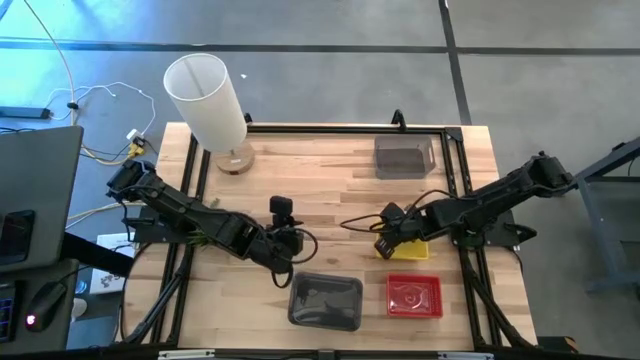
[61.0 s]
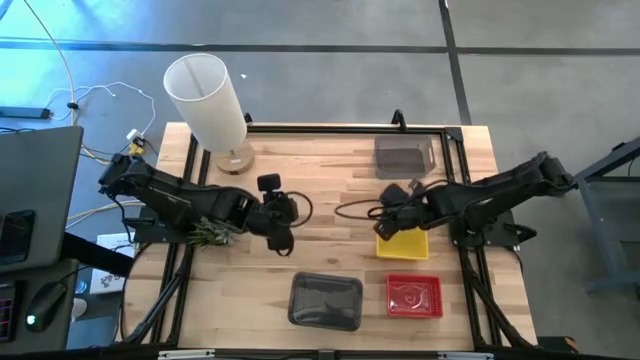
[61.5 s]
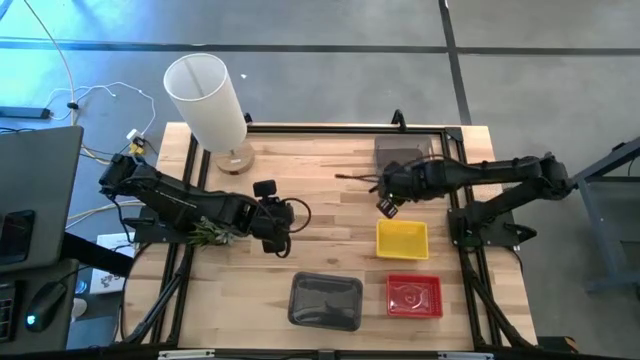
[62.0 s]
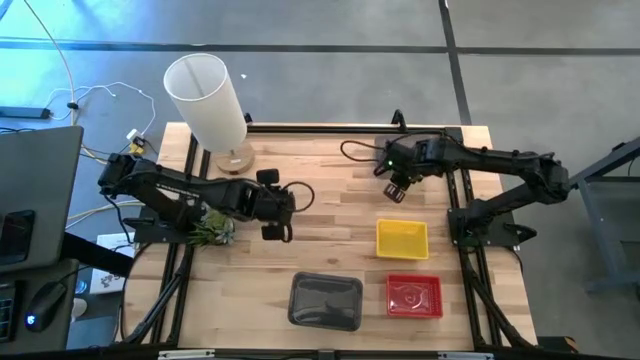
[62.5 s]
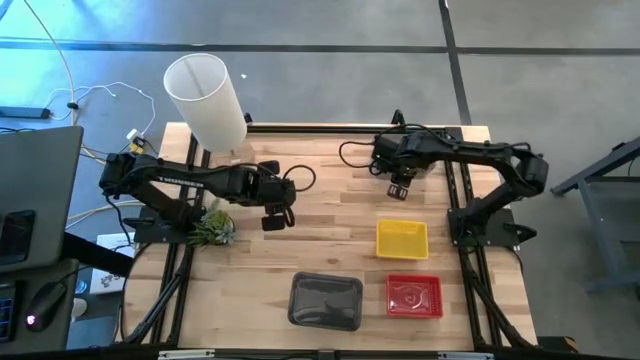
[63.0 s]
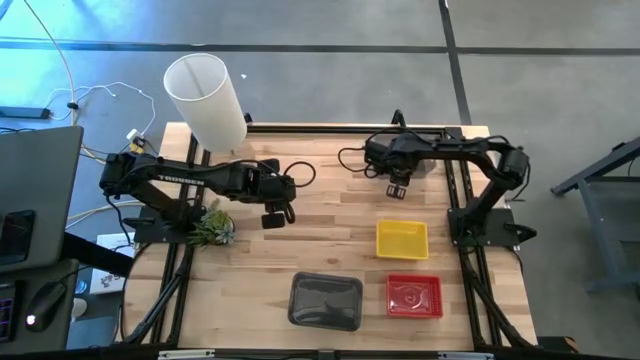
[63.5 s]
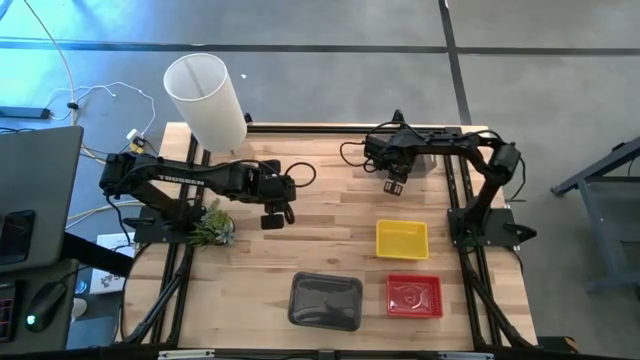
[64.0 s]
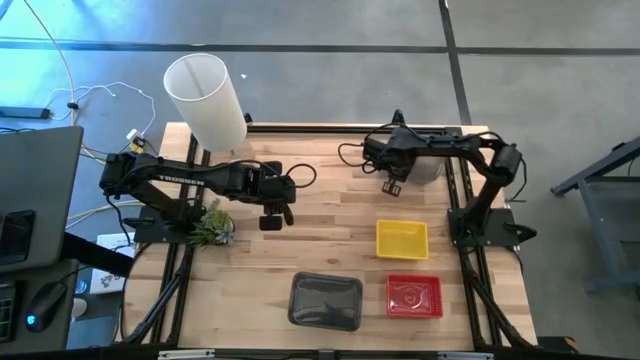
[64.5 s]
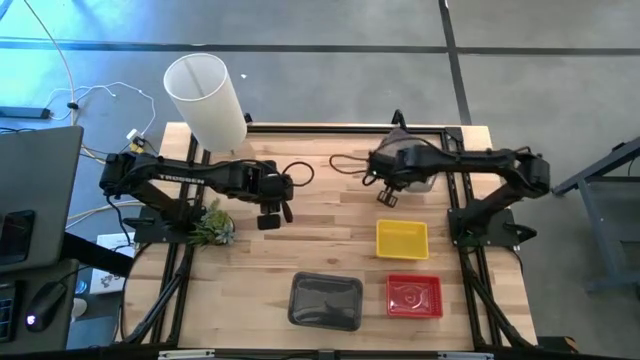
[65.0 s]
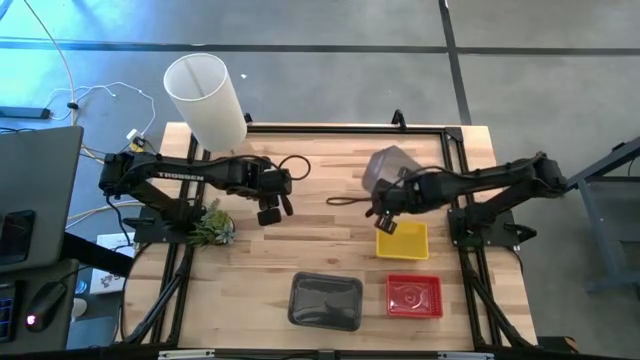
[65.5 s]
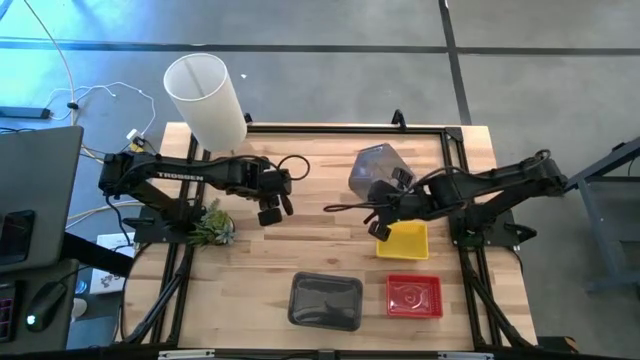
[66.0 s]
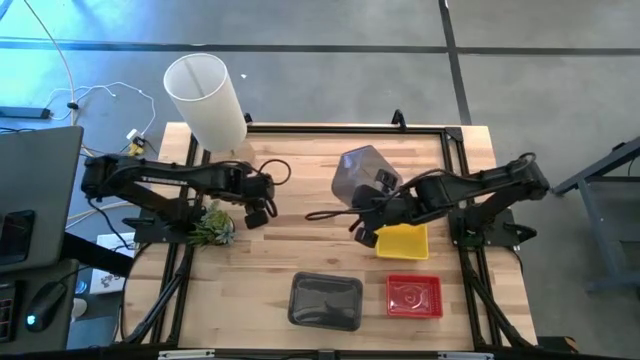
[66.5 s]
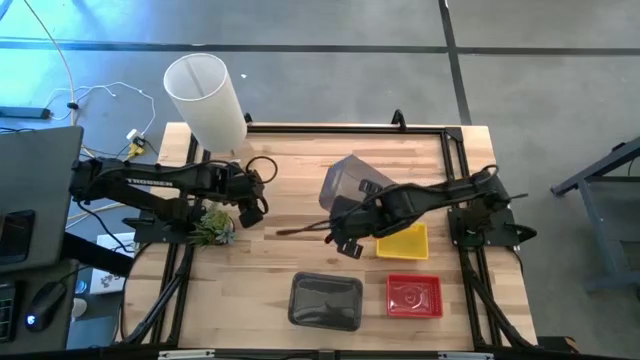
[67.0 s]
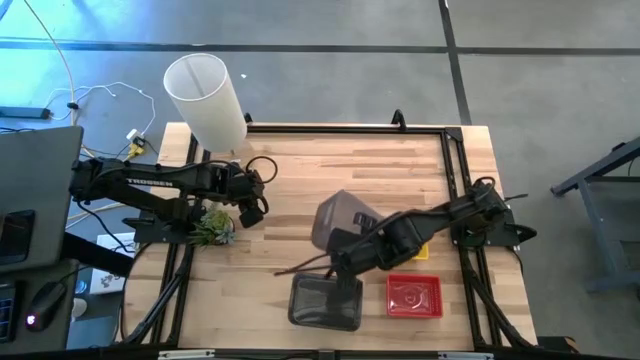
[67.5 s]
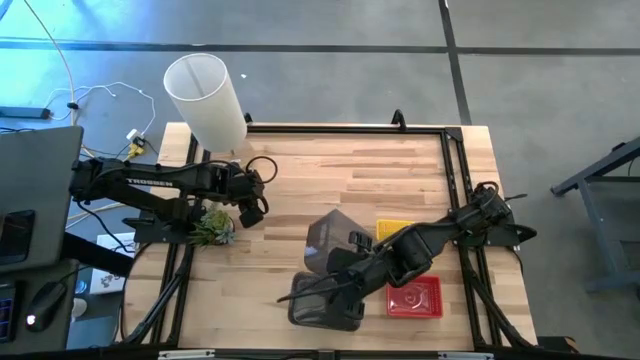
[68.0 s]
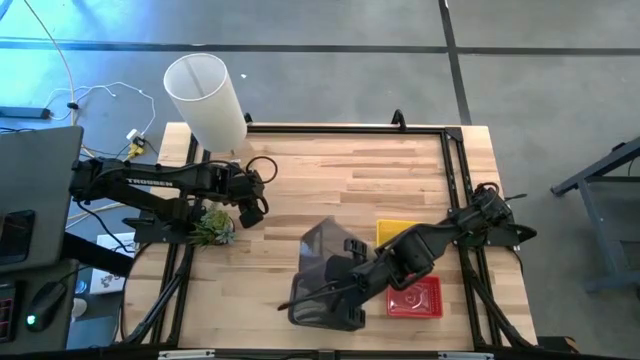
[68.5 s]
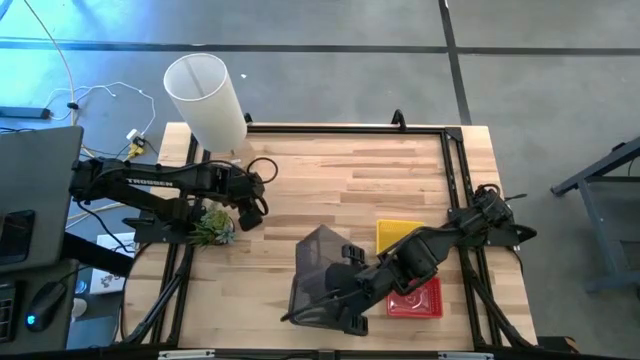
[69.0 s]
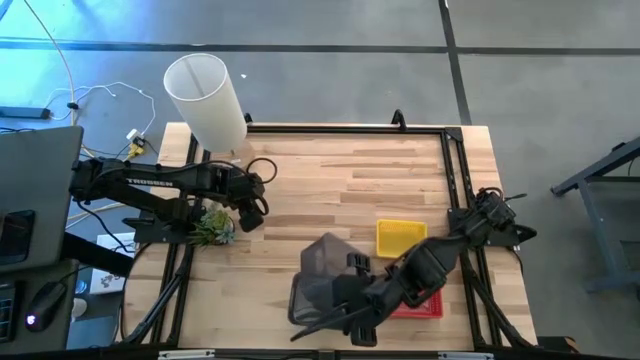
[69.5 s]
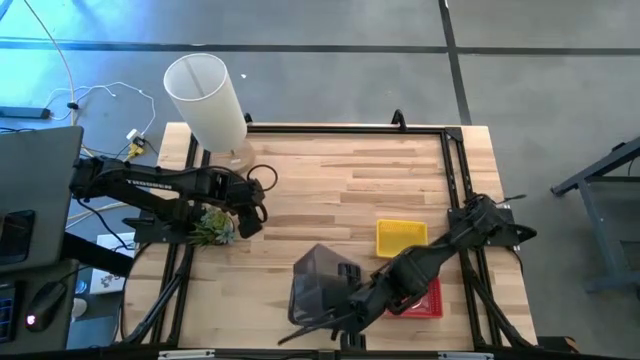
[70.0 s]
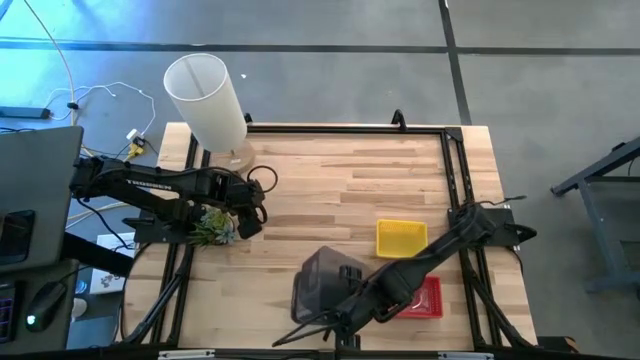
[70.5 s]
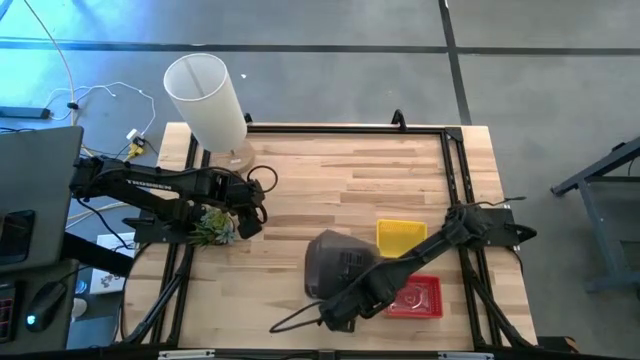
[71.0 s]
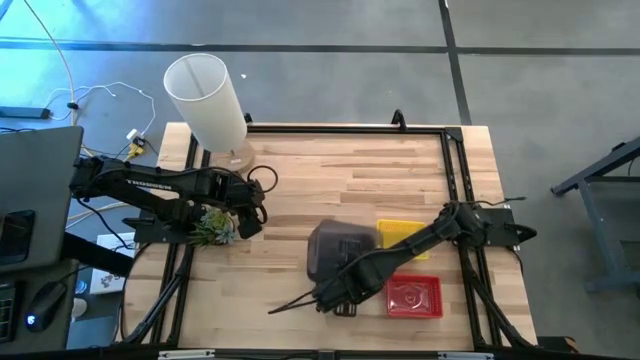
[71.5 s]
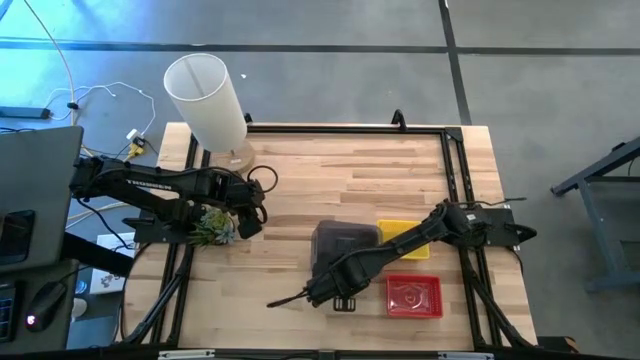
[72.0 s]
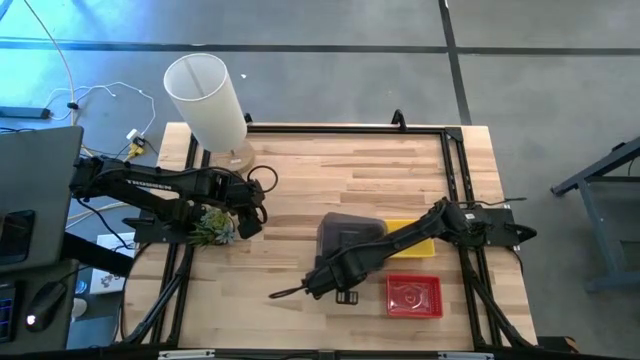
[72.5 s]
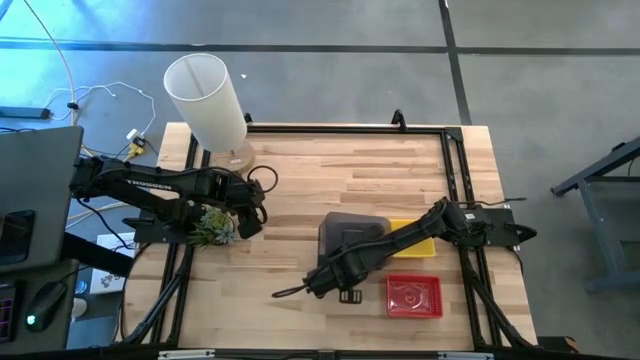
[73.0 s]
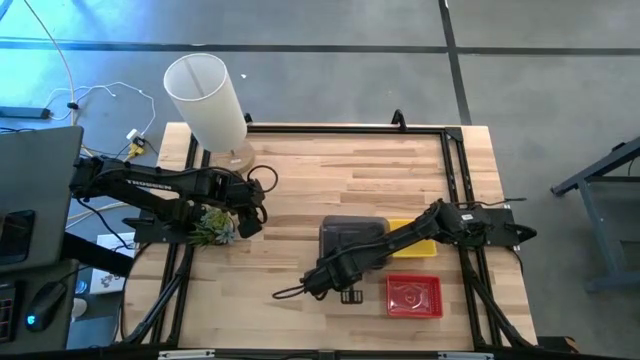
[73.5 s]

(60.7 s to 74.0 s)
Stack the top black bin into the stacked black bins

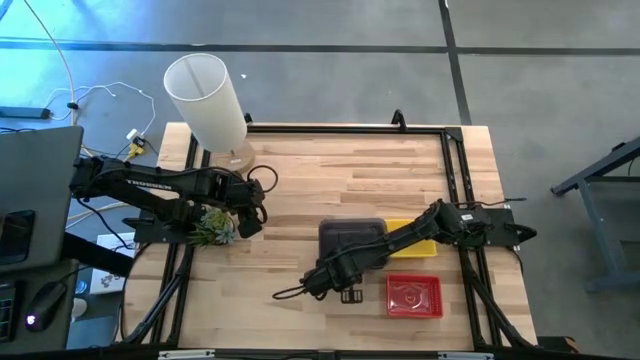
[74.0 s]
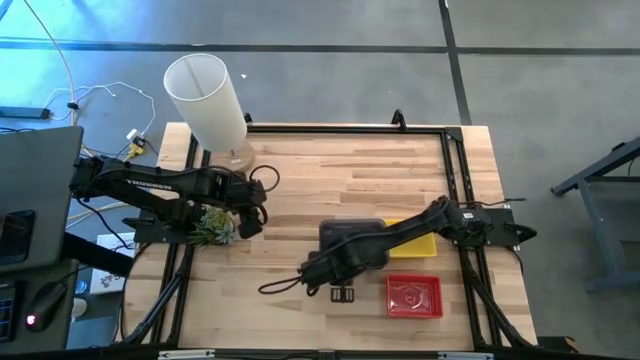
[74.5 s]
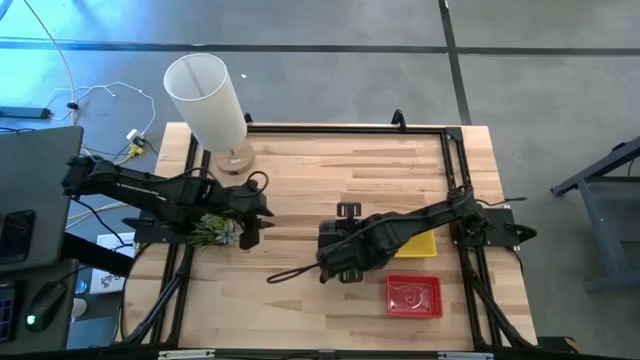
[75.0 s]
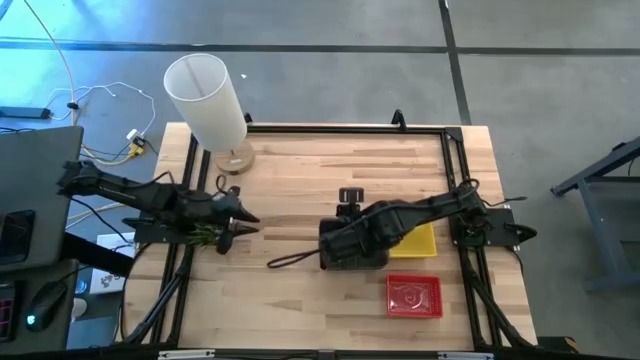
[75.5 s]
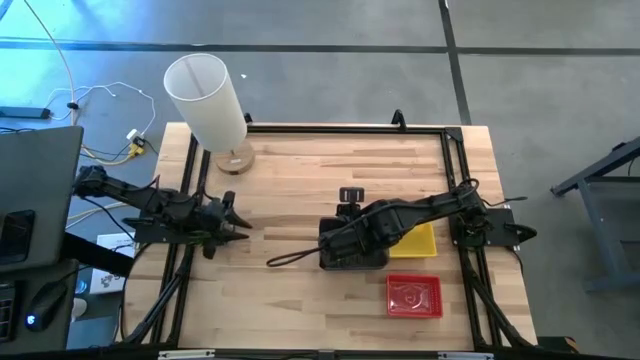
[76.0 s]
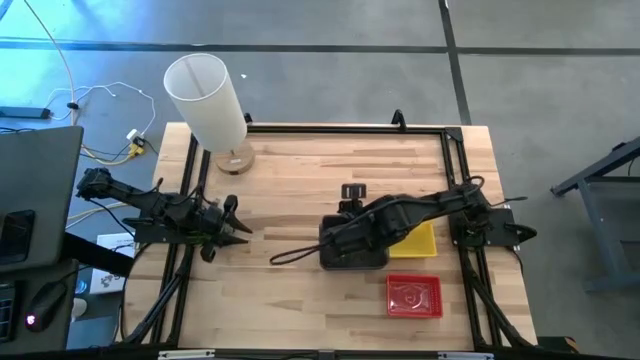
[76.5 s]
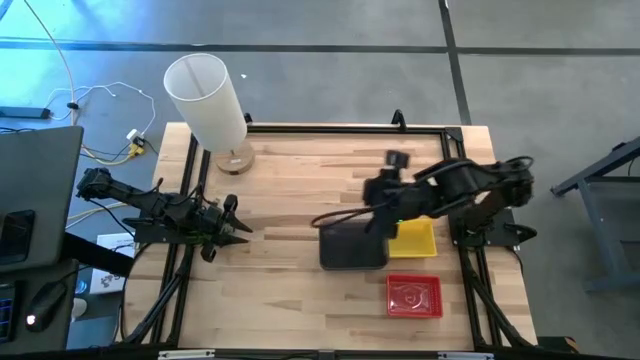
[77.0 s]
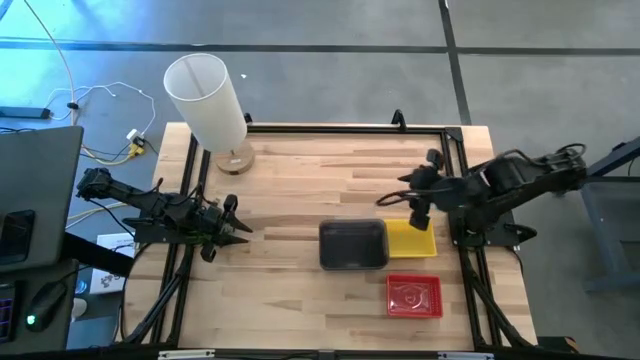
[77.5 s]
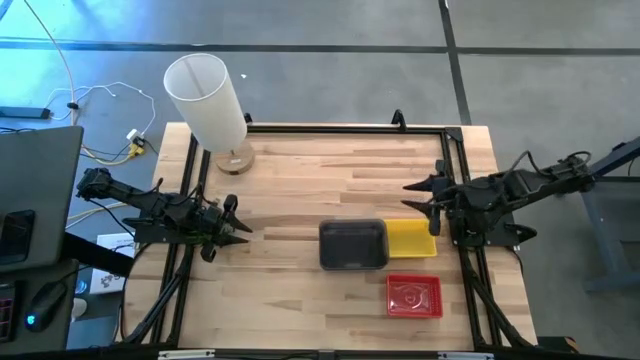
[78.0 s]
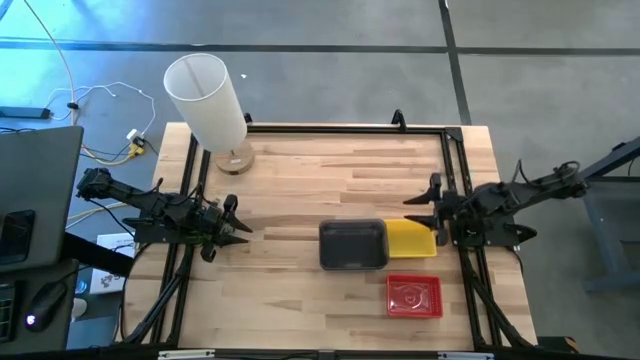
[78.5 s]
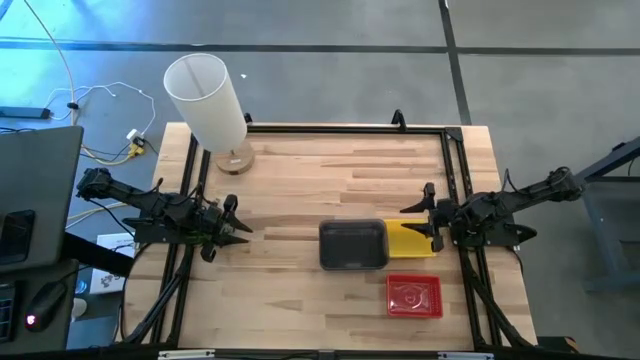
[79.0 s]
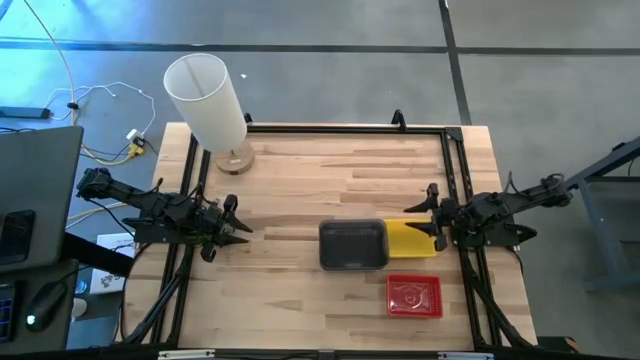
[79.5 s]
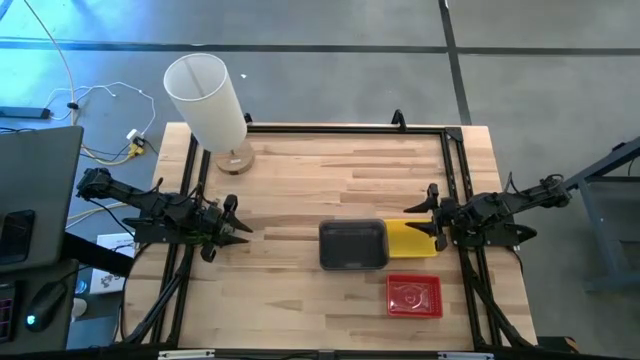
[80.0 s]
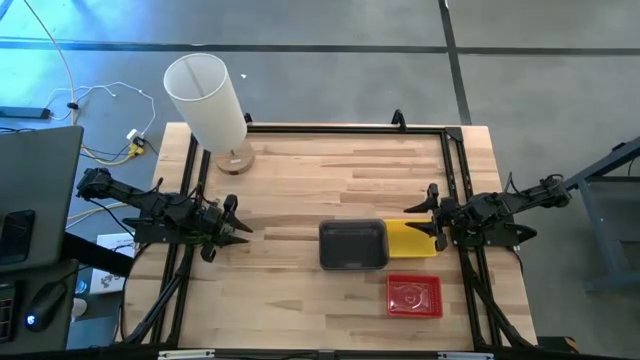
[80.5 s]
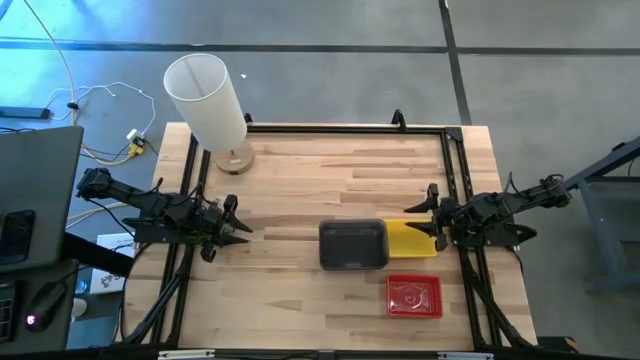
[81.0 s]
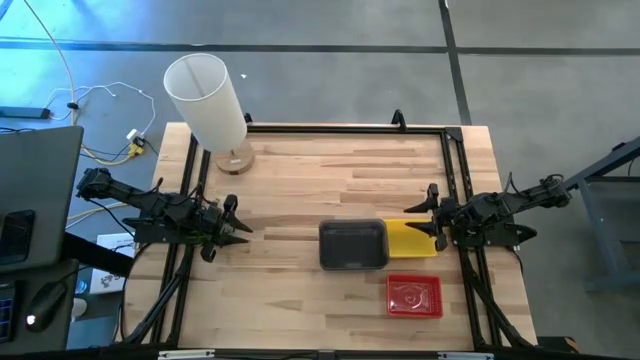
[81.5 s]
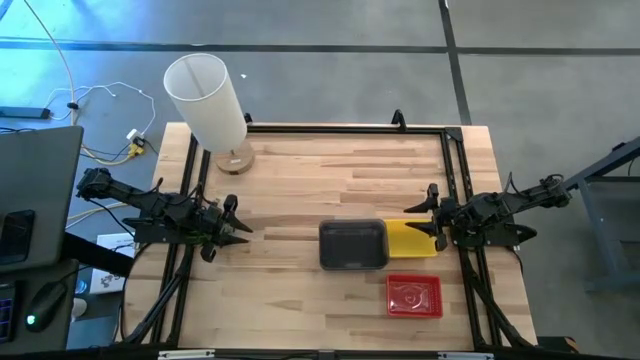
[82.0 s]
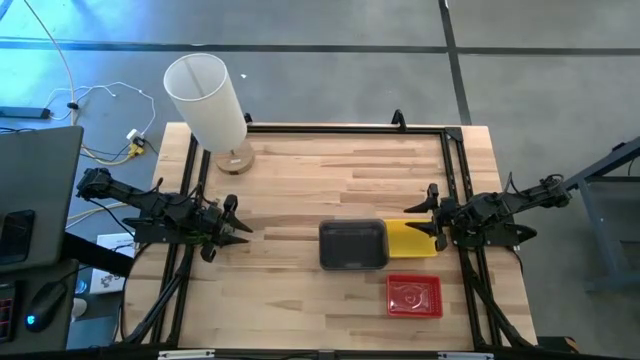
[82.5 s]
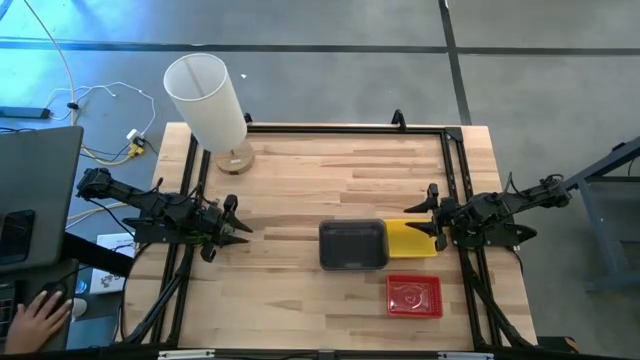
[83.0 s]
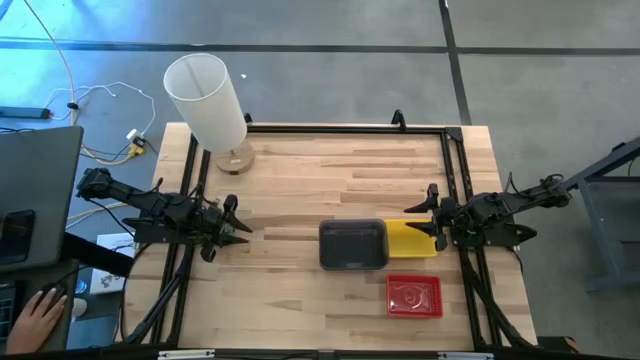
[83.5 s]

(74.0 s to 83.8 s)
Return to Home Position
